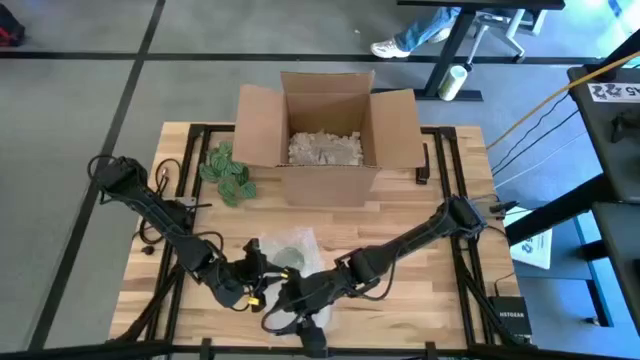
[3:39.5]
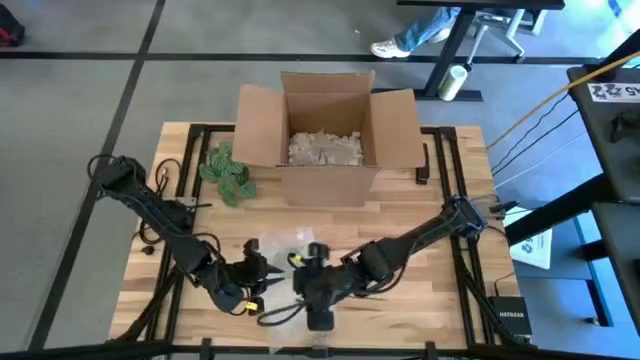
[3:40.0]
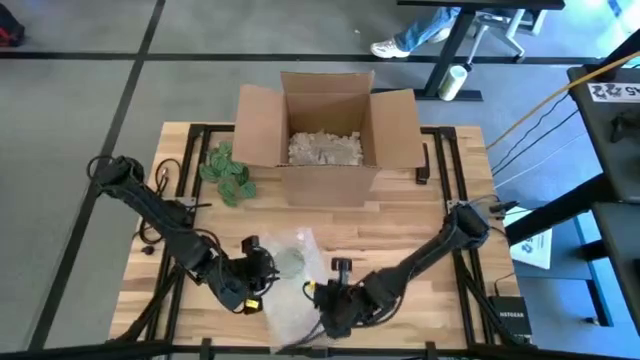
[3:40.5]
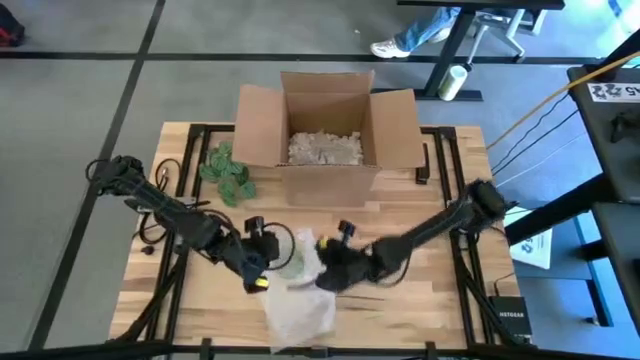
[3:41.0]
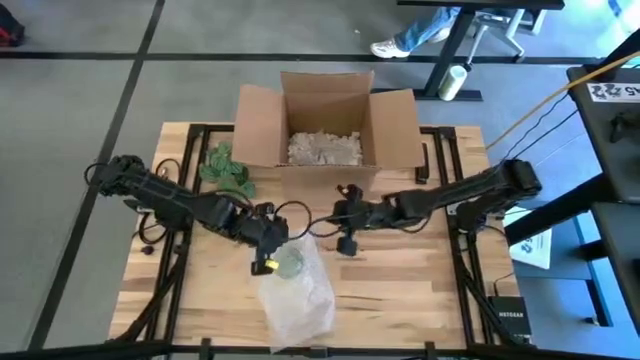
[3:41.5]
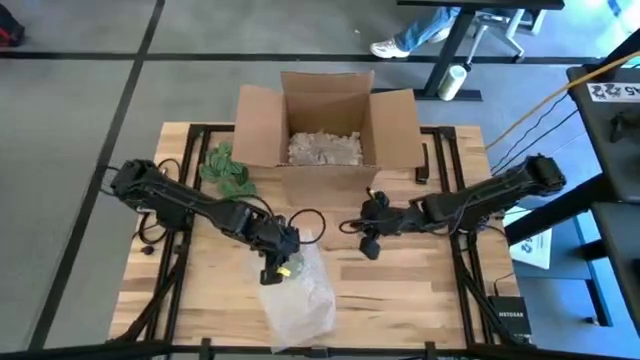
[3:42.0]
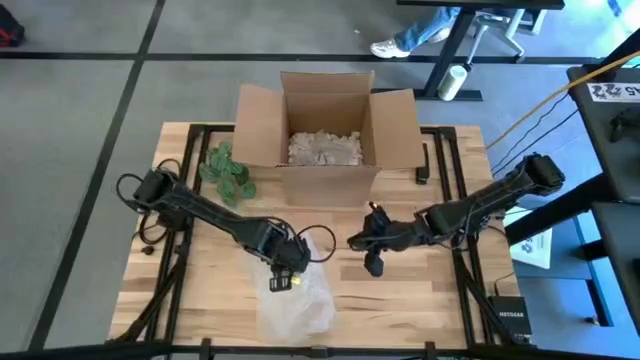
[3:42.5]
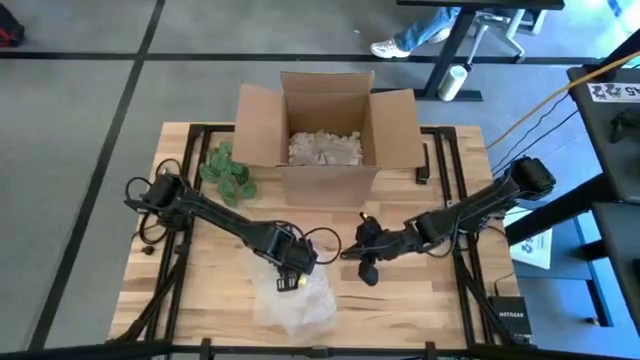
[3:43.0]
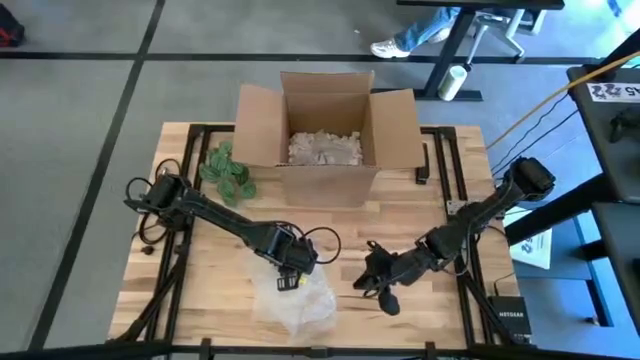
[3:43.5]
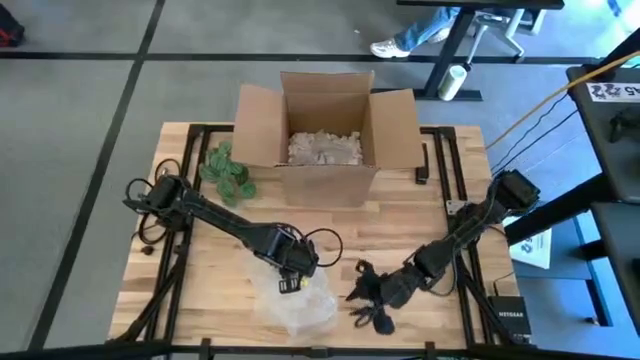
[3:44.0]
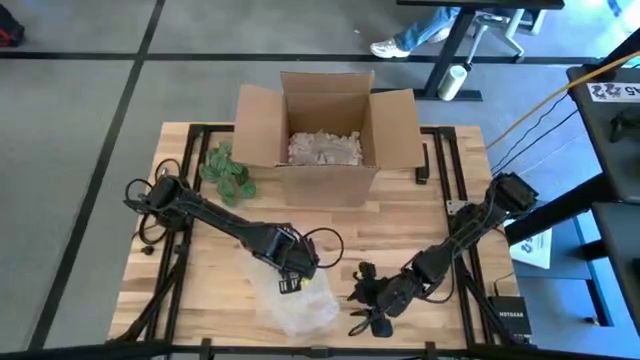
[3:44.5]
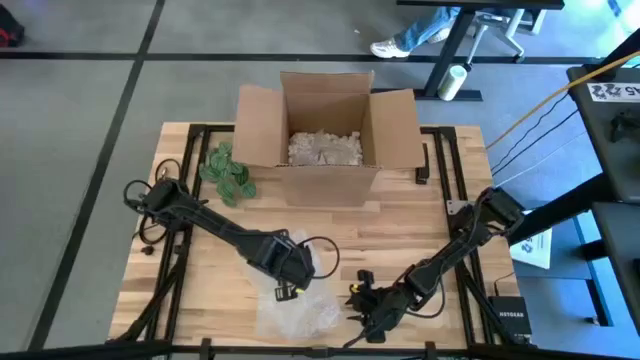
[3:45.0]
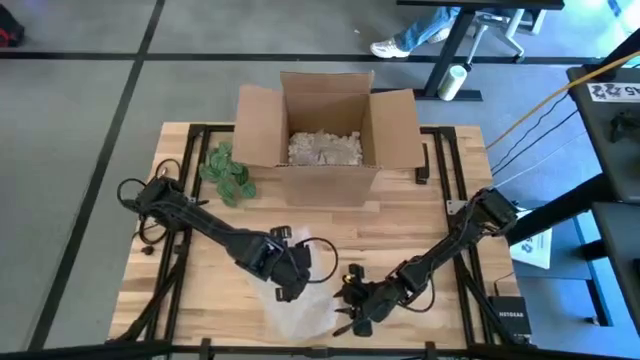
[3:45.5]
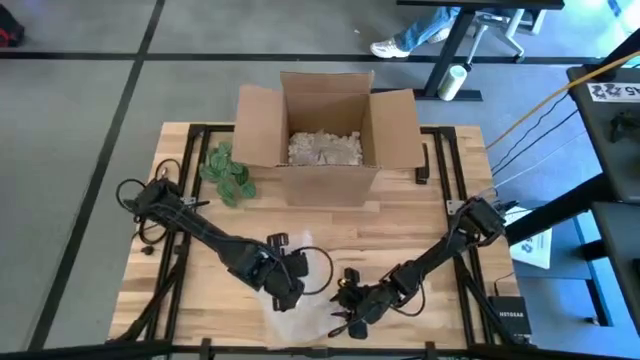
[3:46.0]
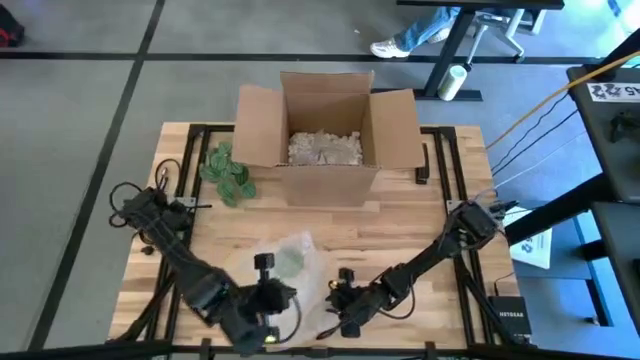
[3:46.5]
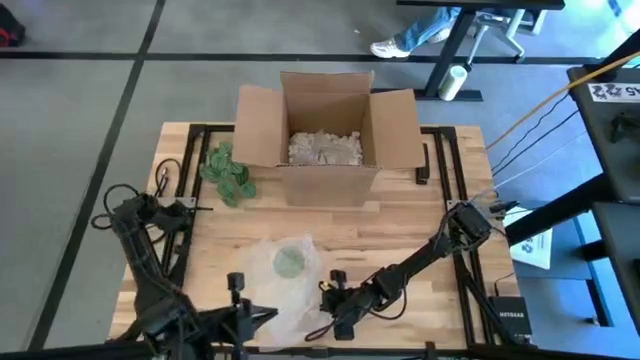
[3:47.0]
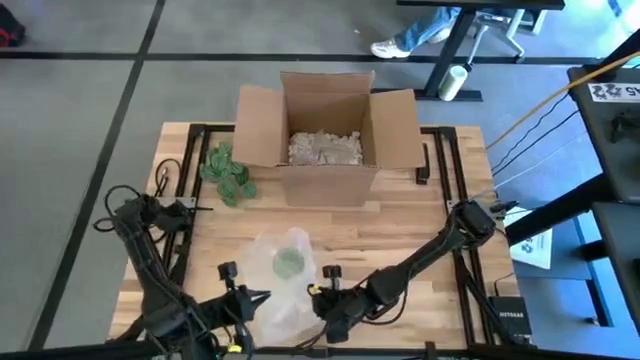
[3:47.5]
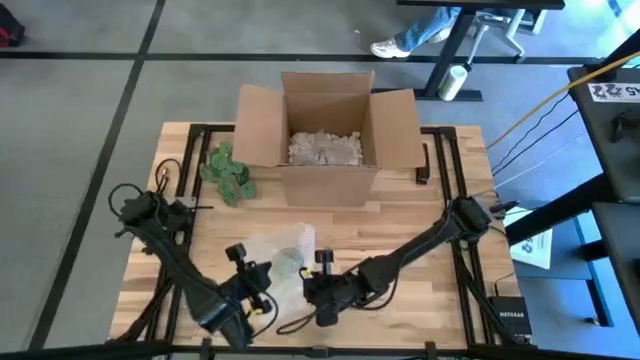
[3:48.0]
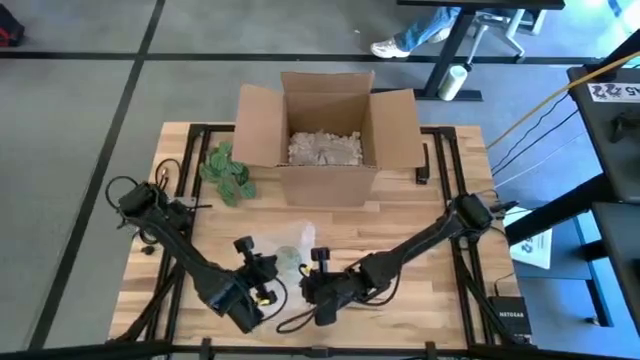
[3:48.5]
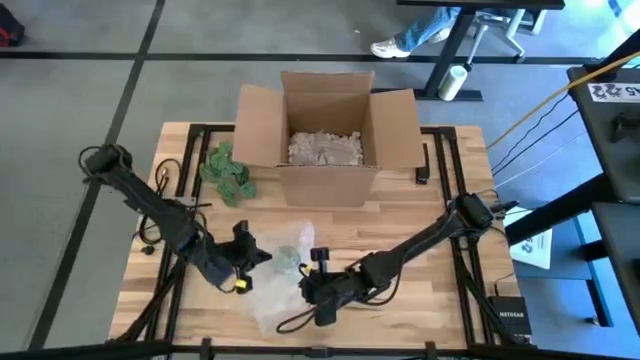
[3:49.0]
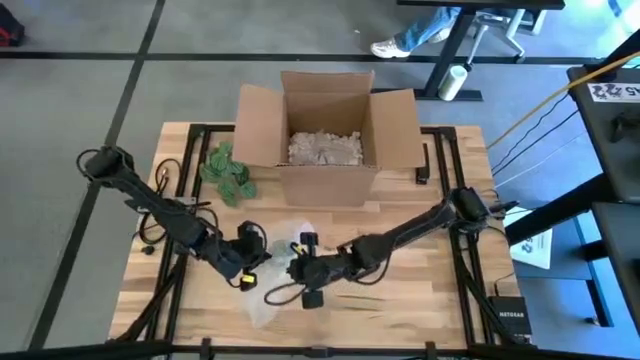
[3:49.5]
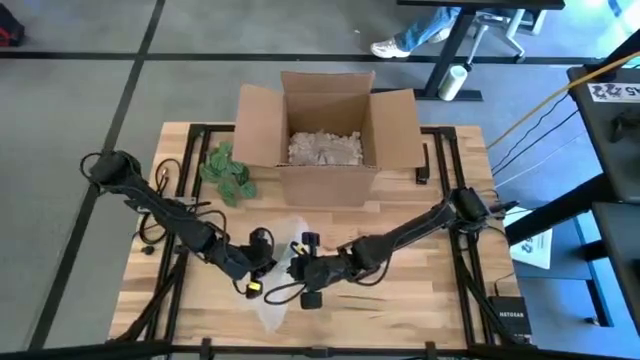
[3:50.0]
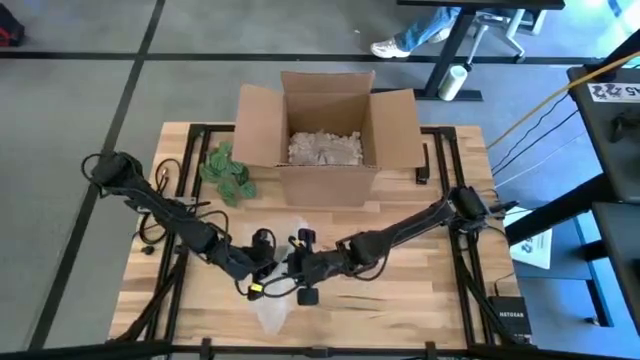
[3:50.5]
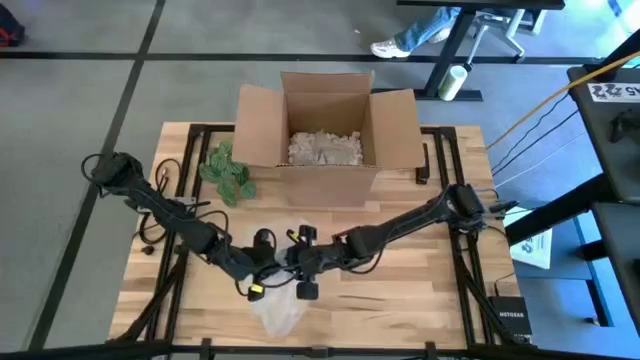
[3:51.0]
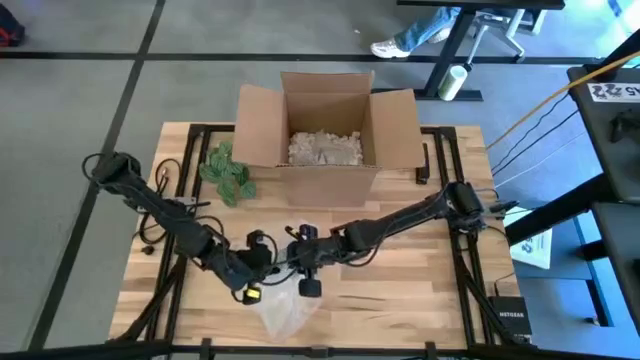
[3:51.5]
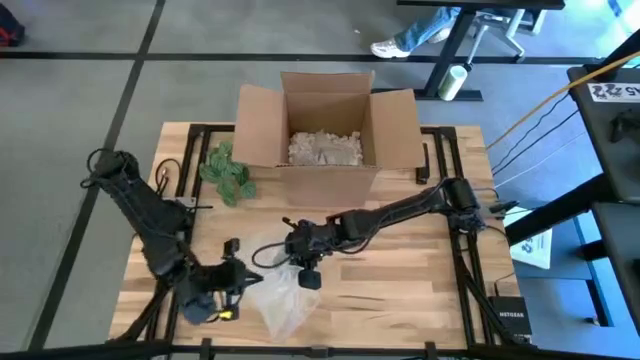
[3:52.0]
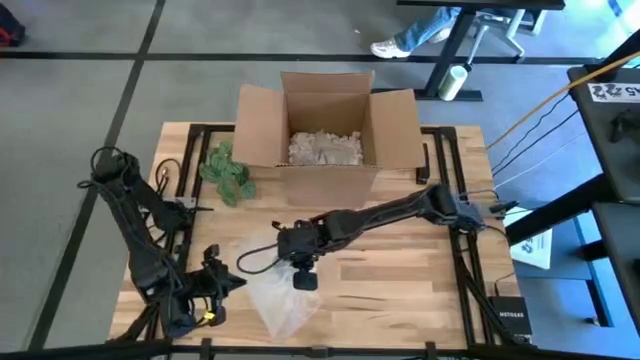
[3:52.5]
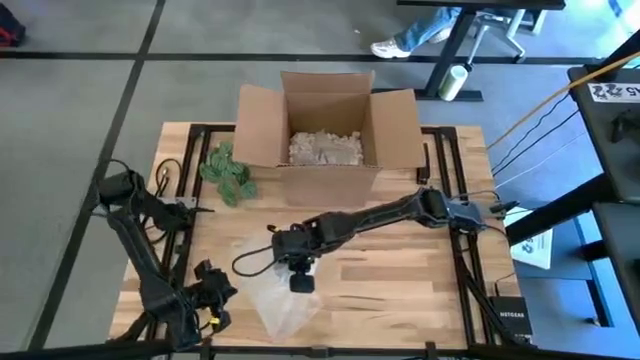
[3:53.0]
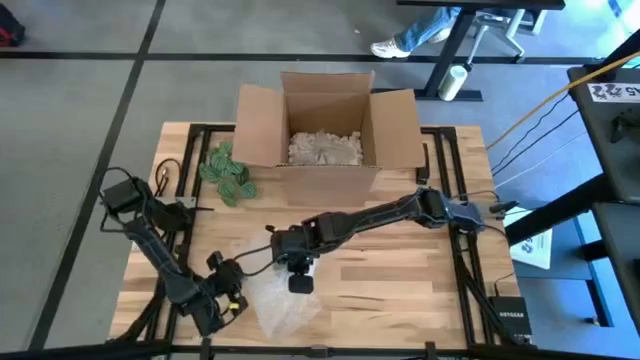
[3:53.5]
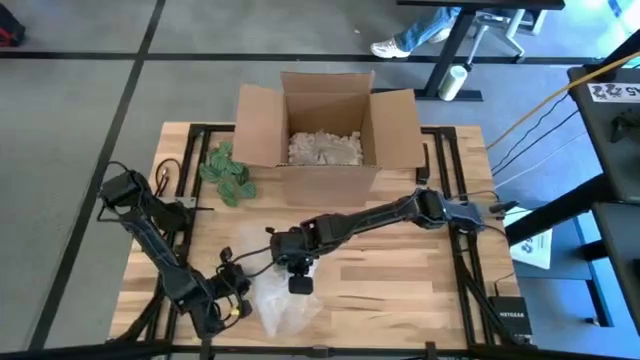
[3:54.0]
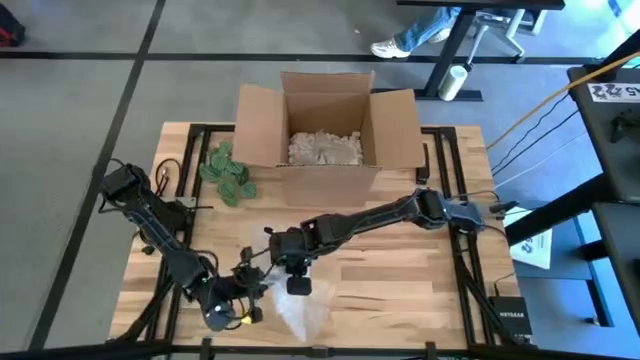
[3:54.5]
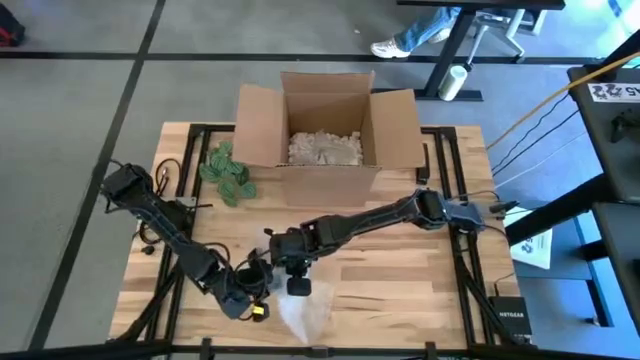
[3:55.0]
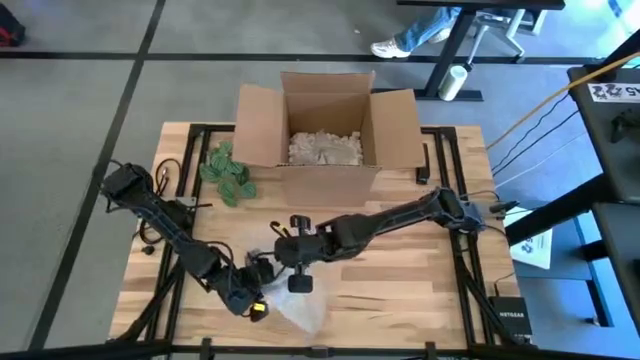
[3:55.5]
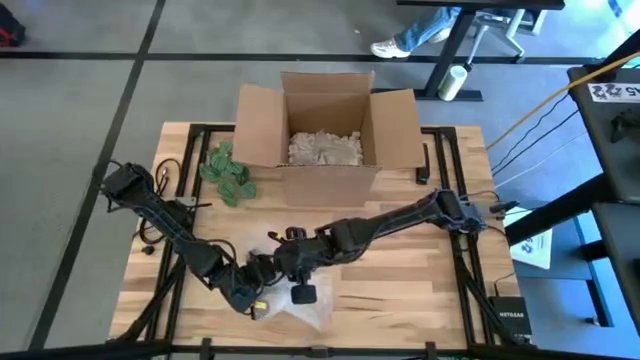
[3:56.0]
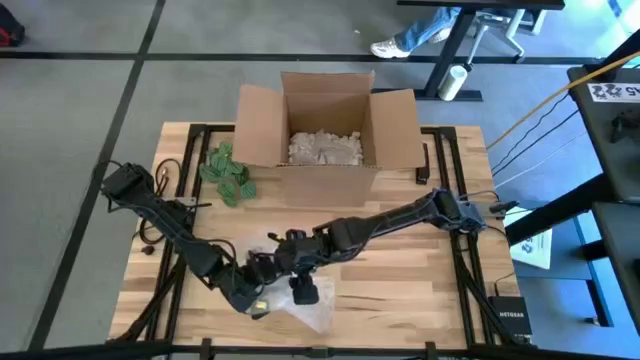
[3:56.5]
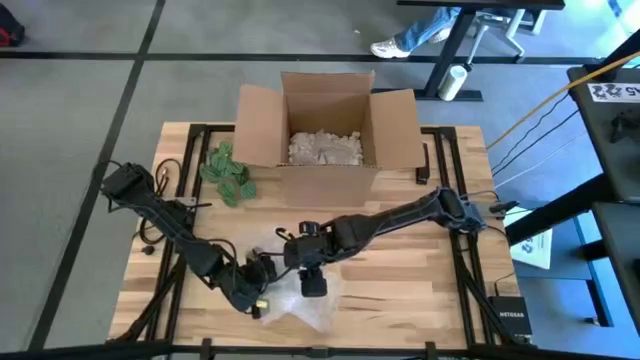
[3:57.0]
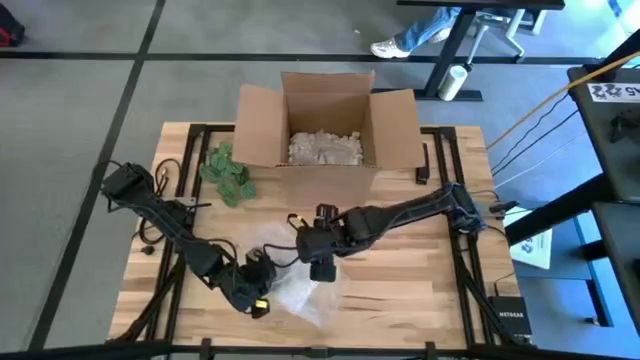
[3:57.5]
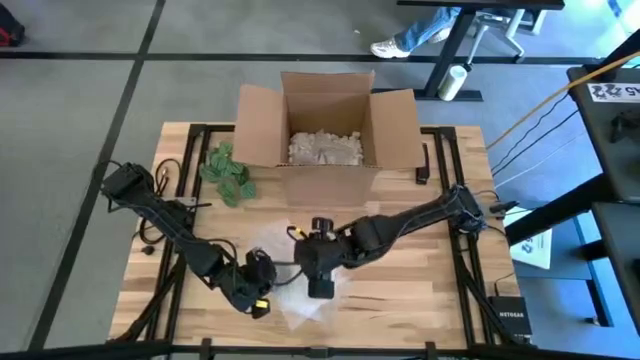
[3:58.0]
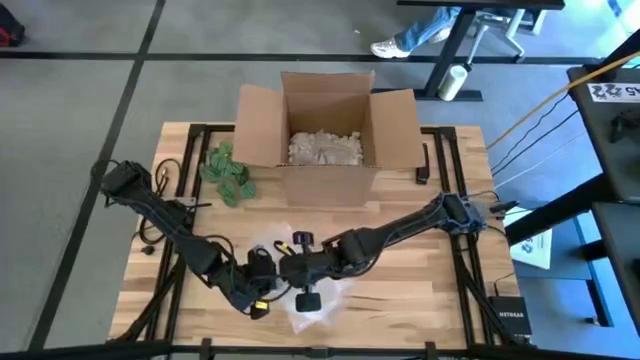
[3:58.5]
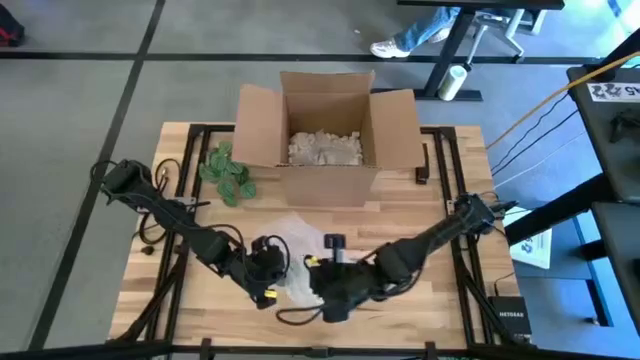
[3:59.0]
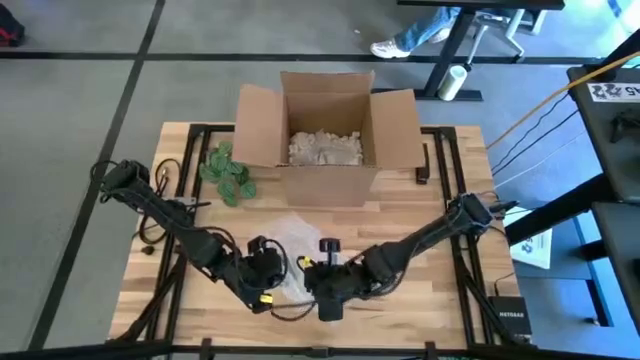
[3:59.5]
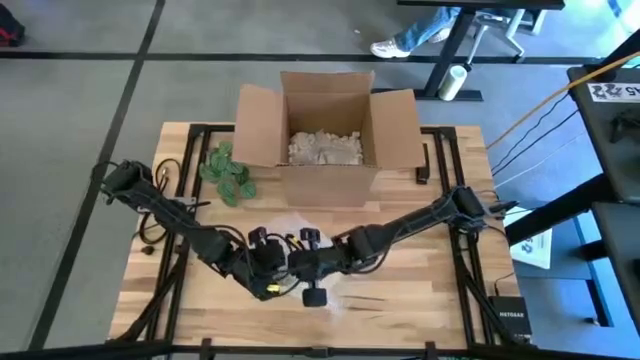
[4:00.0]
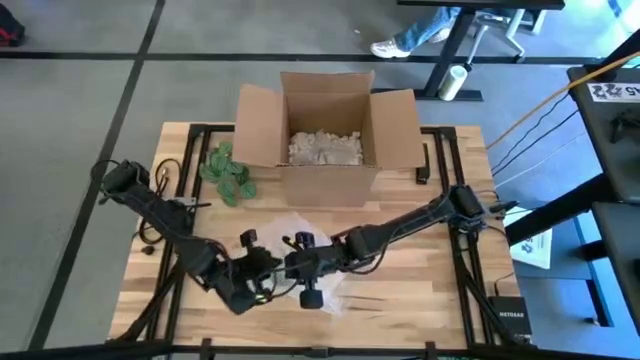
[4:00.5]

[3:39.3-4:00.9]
Task: wrap mug
Wrap the green mug in bubble wrap
